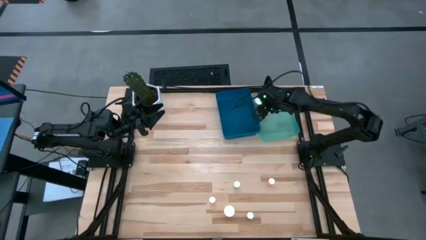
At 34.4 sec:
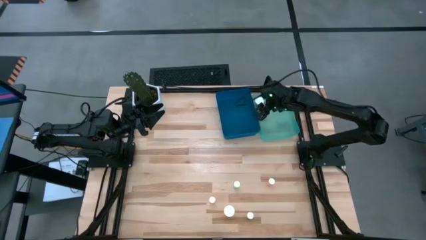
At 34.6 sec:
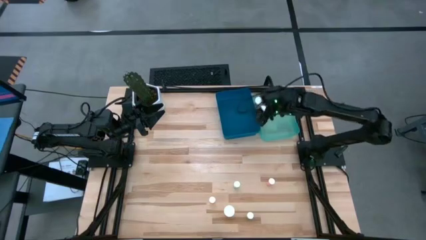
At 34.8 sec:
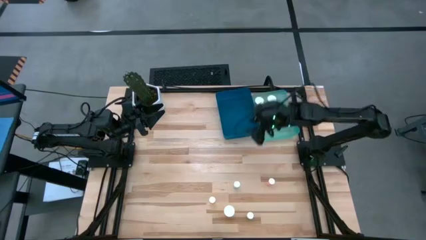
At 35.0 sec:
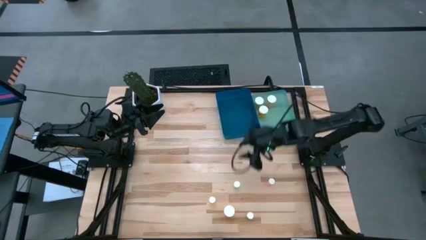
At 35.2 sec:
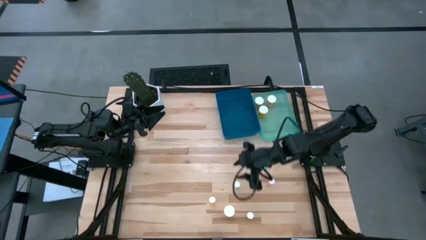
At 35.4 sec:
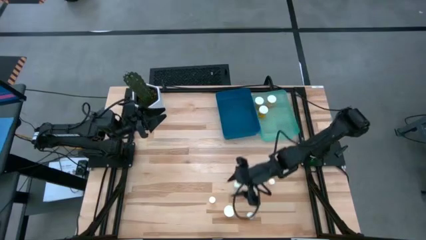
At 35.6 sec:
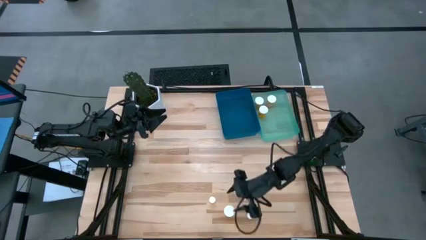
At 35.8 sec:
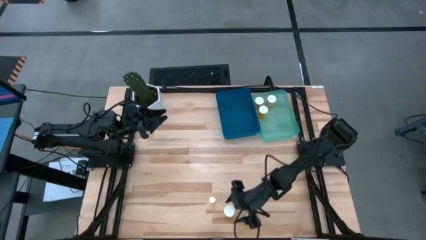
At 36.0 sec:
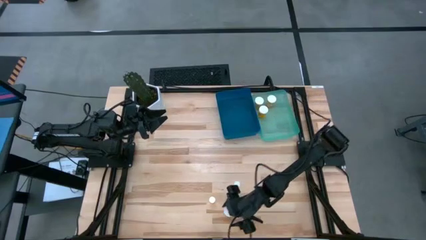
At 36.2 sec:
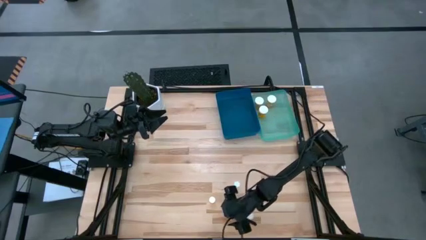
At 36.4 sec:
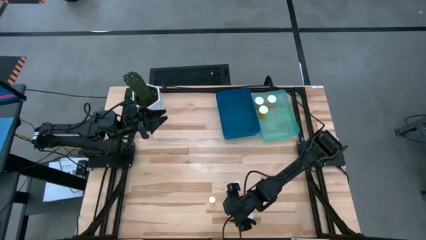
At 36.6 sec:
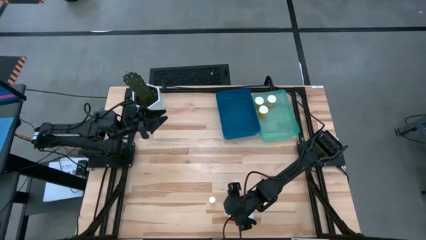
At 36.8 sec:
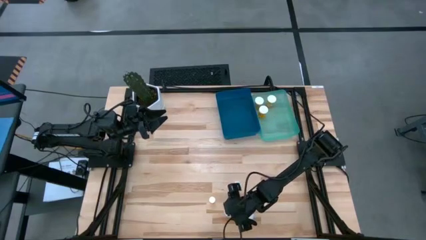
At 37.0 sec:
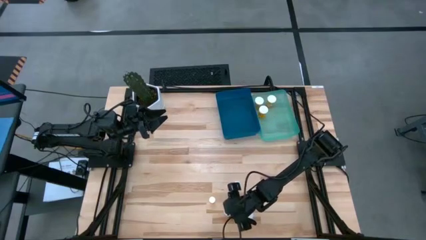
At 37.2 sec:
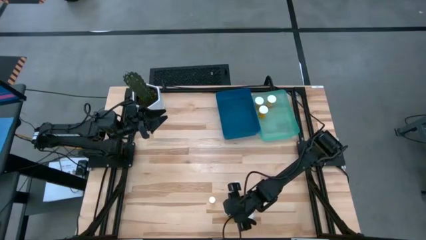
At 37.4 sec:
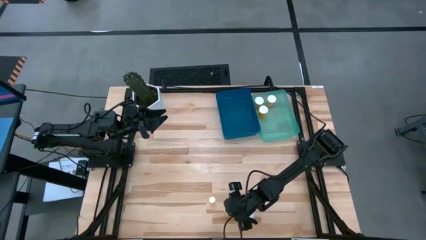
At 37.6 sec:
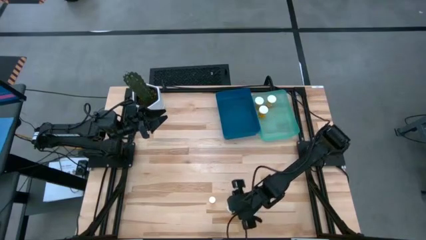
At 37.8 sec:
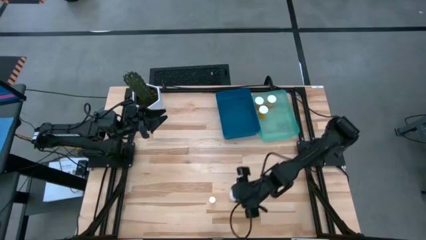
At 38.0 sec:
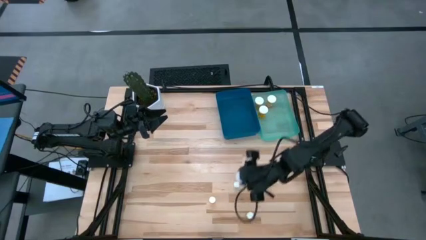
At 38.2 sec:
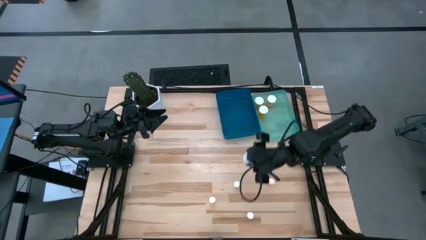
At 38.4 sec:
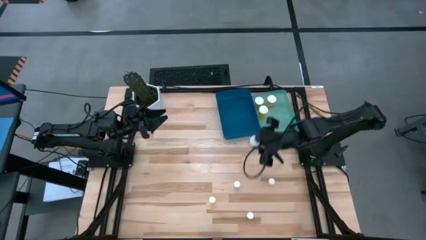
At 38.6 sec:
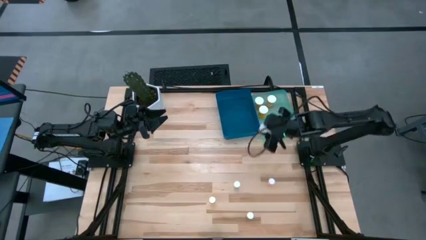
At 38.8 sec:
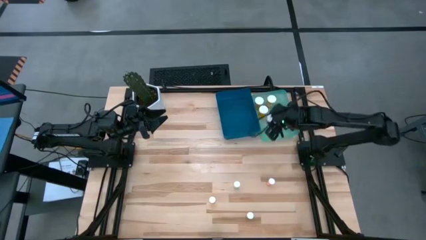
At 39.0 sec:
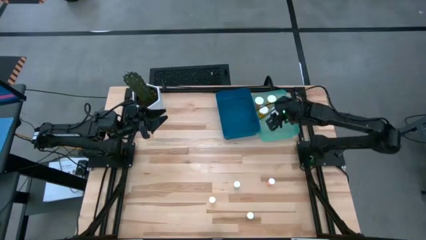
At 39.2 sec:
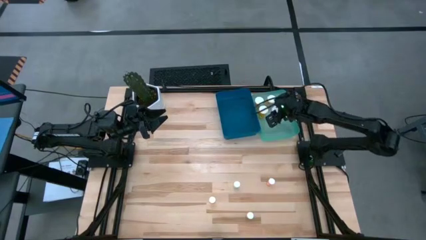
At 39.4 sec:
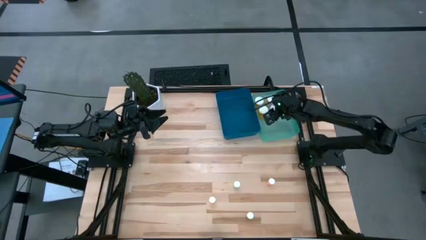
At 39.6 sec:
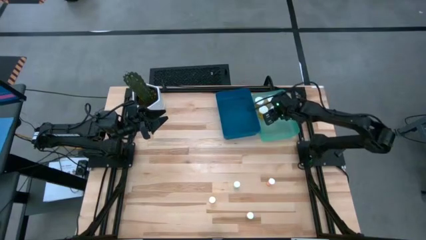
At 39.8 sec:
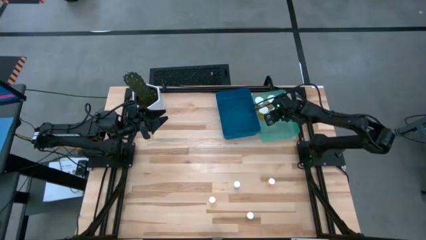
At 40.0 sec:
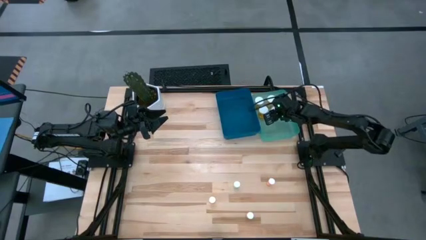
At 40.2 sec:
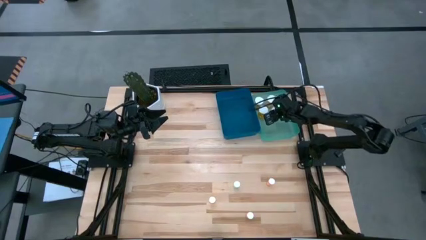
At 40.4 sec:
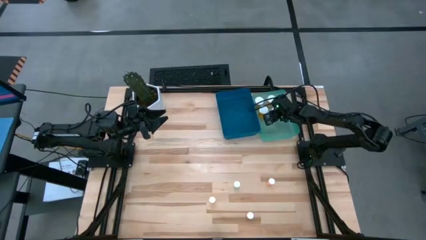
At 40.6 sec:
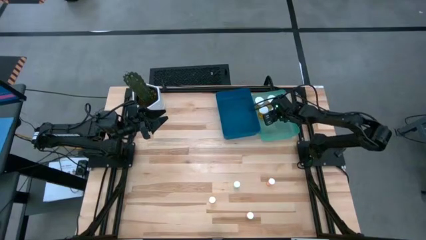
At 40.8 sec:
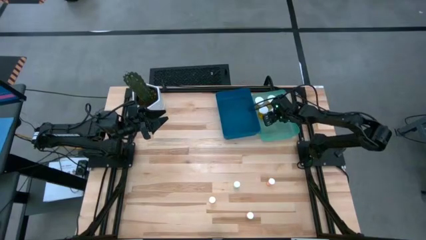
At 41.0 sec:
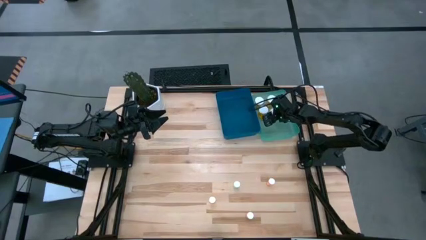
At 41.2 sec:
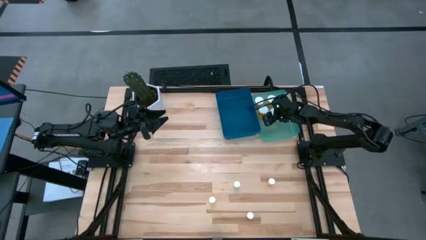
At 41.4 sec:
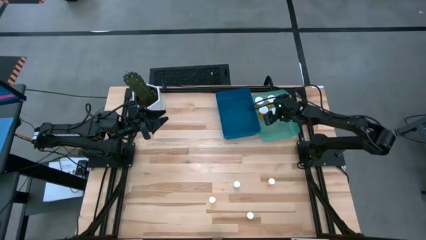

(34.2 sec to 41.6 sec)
Task: Pick and place medicine bottles into bin by pill shape (circle, oval)
Put the orange capsule bottle into the light blue bin

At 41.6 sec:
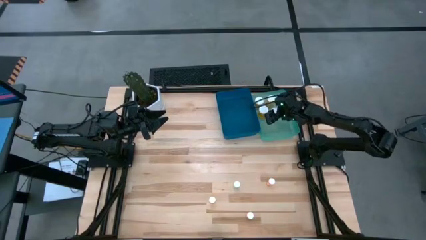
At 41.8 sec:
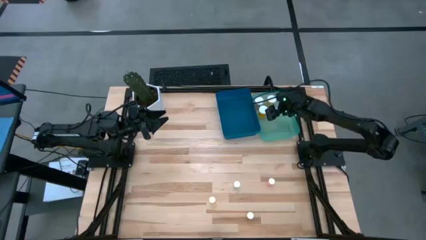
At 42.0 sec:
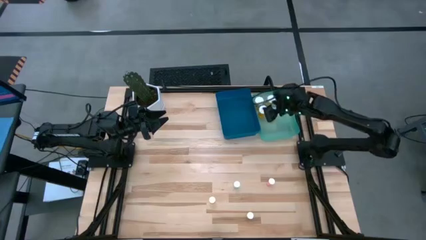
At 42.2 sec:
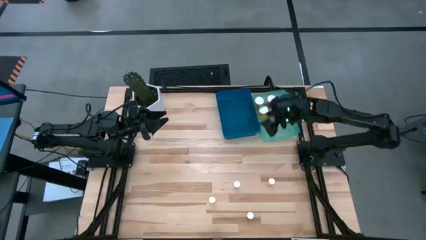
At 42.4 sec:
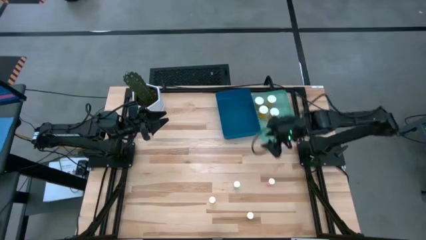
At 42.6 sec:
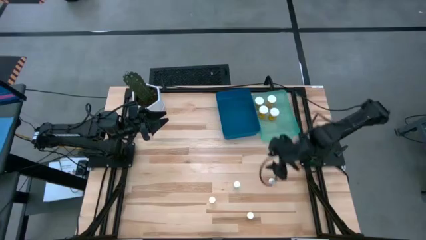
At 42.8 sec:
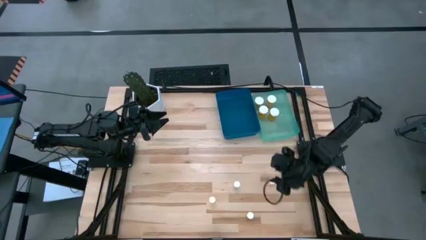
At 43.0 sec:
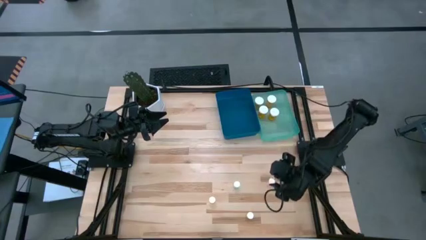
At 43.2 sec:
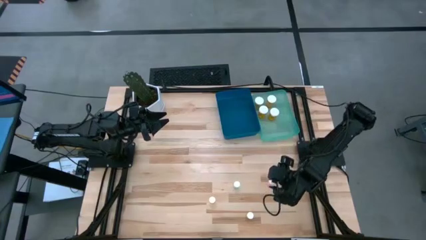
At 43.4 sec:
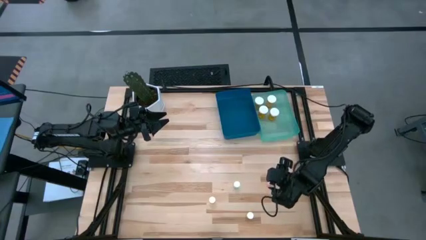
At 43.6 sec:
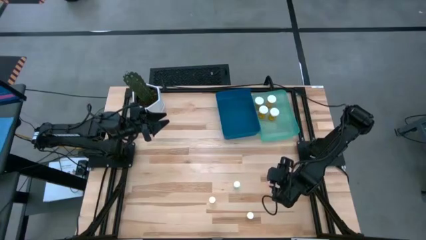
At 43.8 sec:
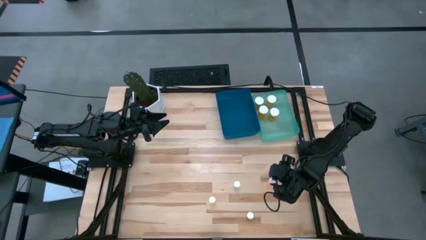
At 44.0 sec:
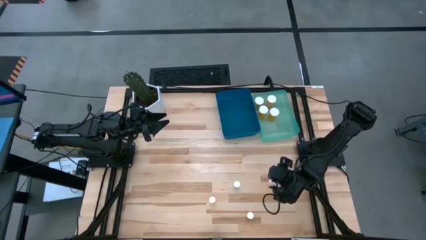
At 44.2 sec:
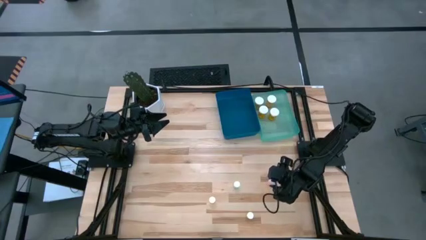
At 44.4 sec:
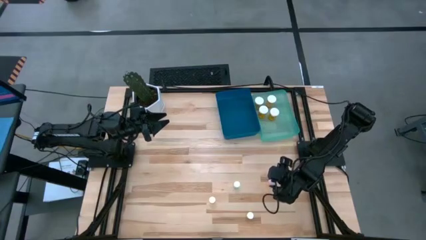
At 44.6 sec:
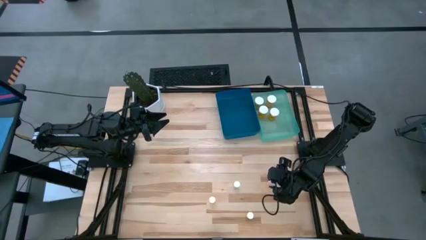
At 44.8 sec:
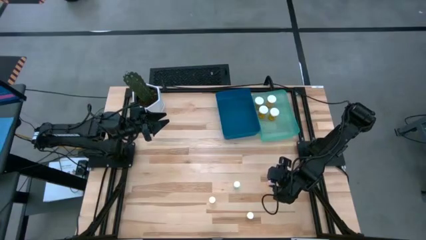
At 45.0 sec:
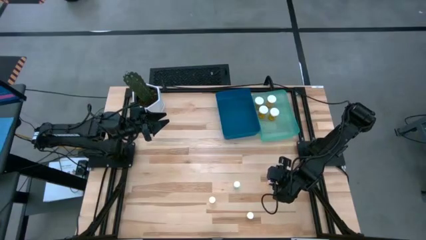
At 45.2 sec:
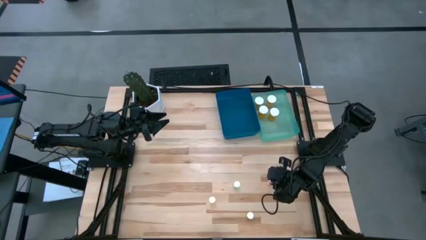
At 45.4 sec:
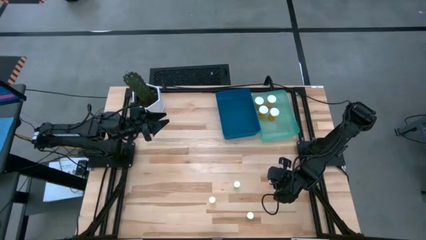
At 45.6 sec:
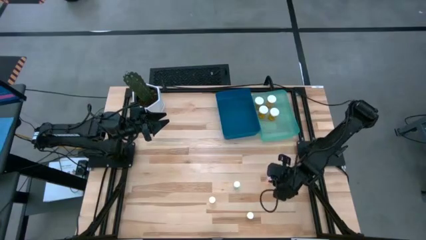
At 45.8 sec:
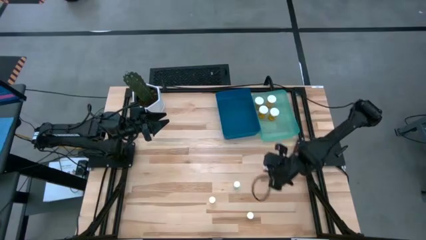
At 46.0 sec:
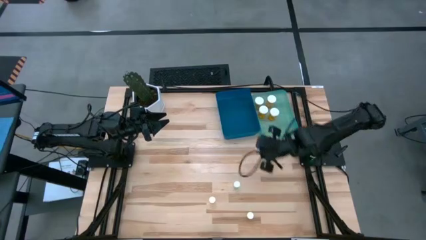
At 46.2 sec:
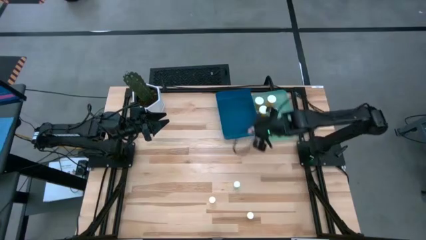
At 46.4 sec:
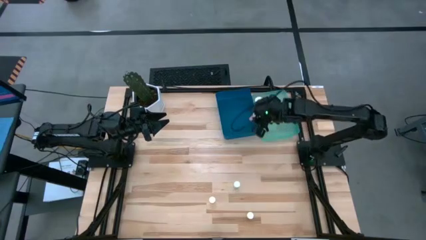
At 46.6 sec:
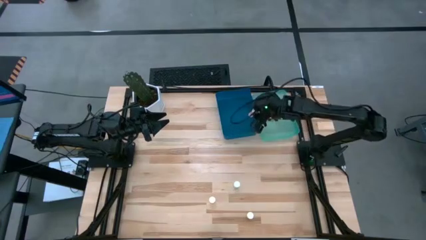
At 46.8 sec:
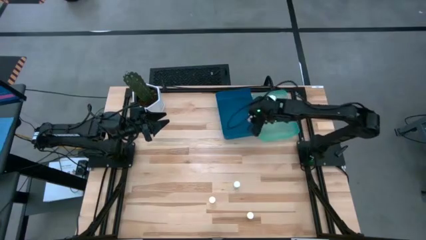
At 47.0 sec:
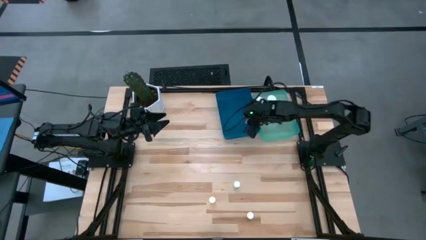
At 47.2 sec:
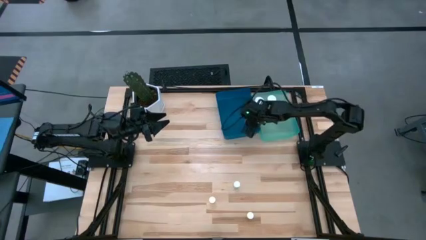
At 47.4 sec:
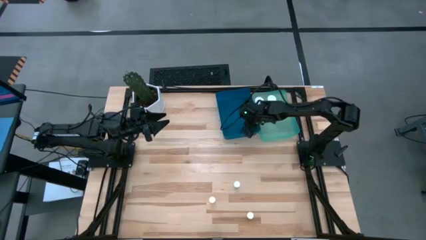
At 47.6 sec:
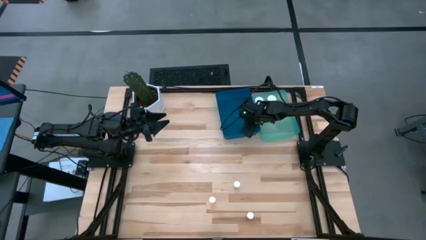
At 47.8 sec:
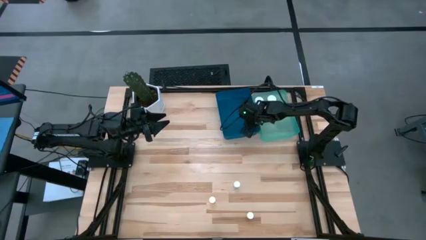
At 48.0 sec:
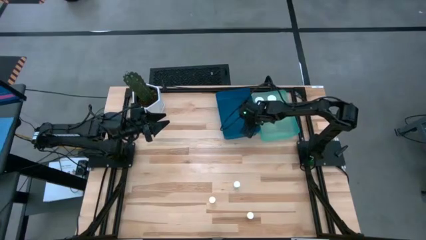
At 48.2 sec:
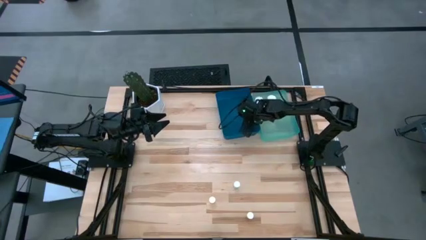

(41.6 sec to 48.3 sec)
Put the pink tablet bottle into the dark blue bin

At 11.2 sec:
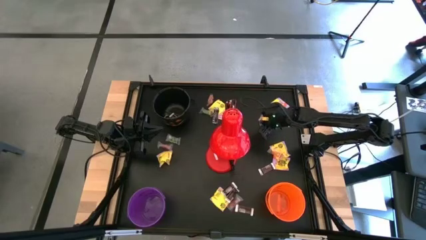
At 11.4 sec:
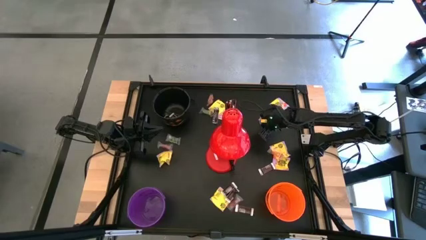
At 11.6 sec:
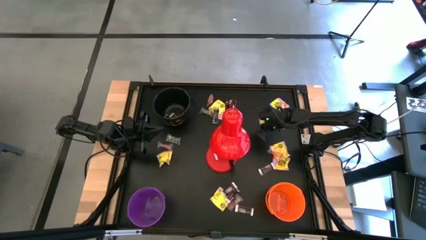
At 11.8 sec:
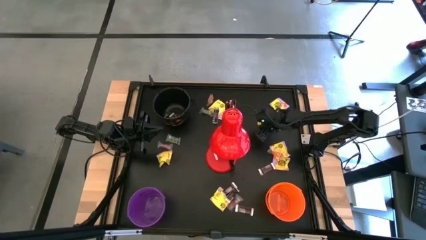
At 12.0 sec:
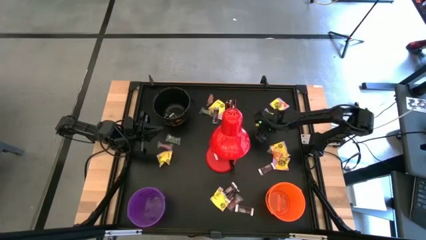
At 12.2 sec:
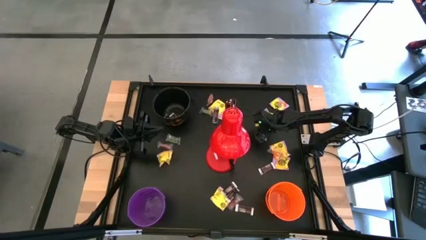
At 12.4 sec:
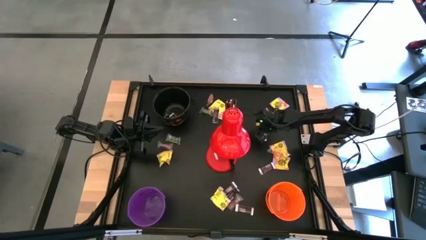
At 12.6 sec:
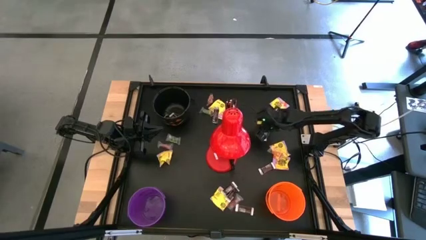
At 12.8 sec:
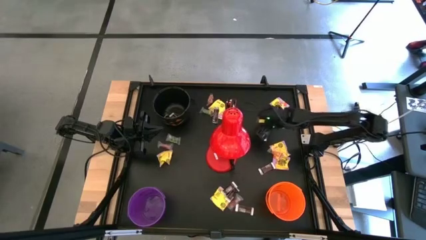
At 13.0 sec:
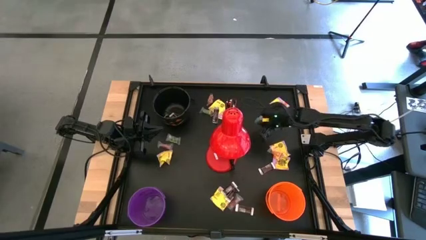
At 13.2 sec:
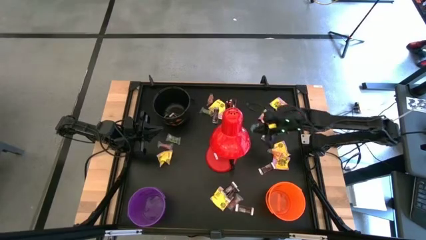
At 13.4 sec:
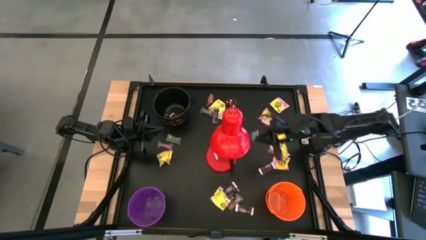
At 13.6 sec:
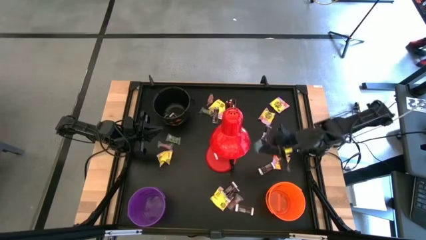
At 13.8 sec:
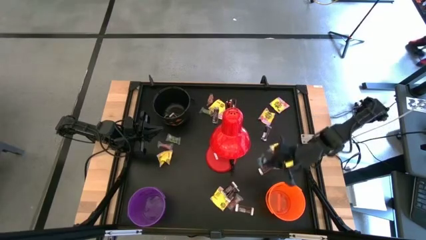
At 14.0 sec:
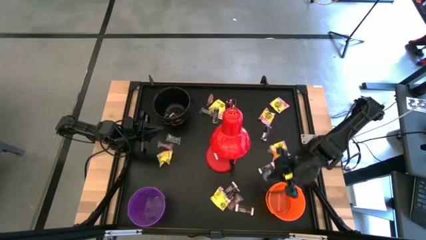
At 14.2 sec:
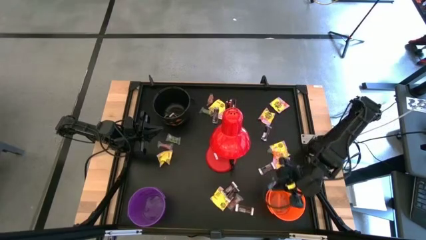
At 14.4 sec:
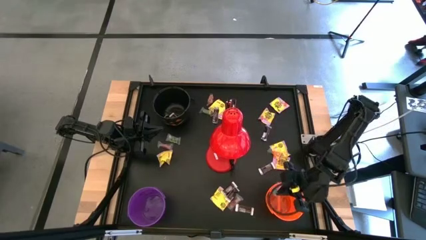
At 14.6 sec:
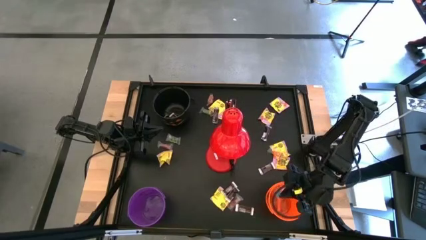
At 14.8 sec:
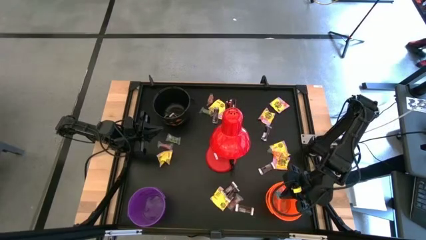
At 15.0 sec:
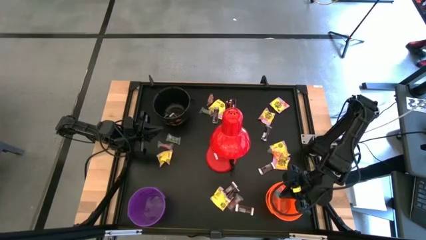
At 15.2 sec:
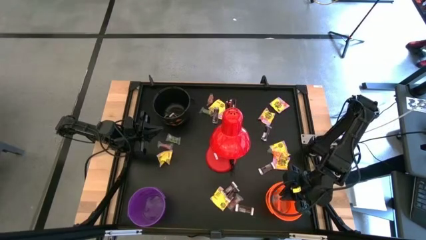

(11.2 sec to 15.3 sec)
Task: Organize candy in baskets
Put the blue gummy into the orange bucket
